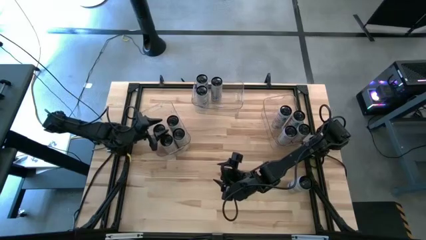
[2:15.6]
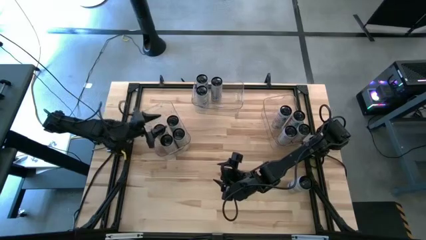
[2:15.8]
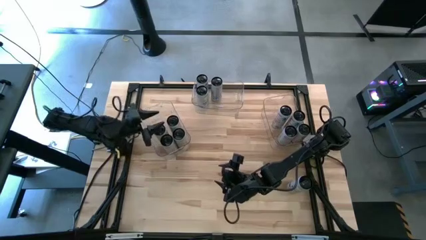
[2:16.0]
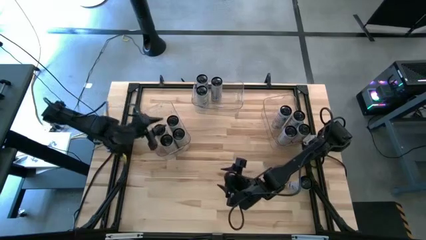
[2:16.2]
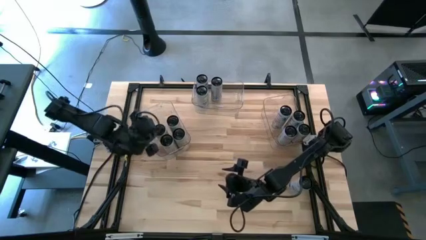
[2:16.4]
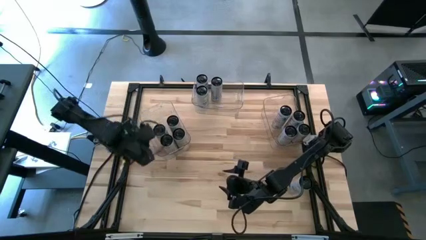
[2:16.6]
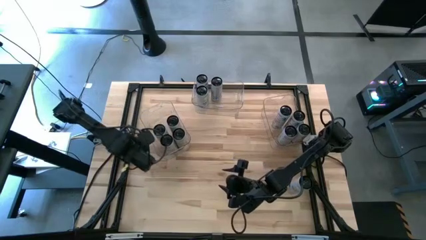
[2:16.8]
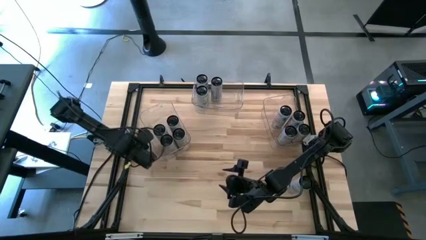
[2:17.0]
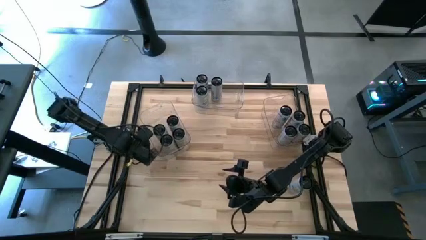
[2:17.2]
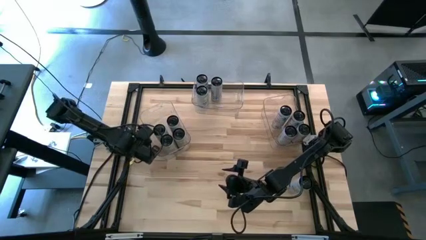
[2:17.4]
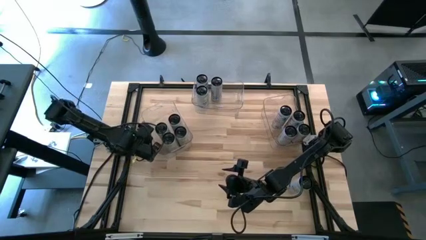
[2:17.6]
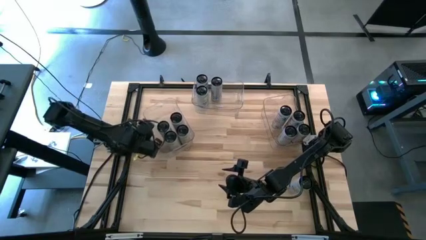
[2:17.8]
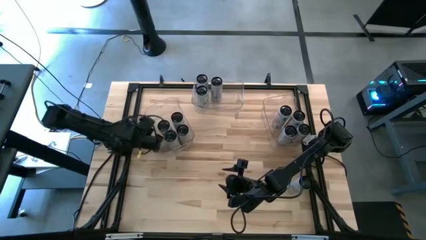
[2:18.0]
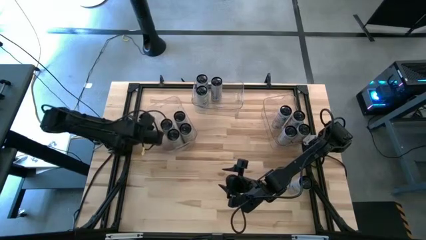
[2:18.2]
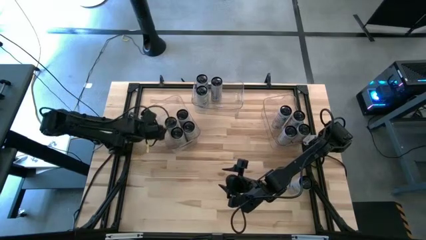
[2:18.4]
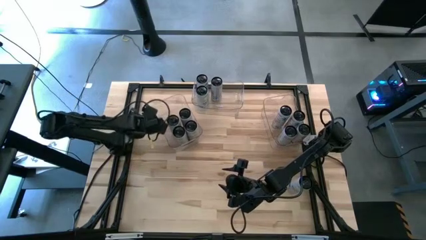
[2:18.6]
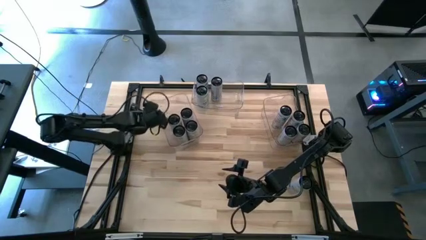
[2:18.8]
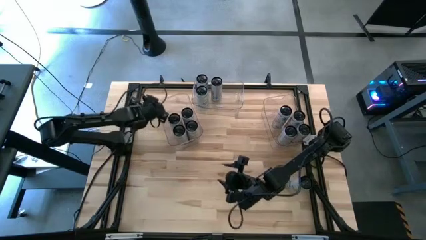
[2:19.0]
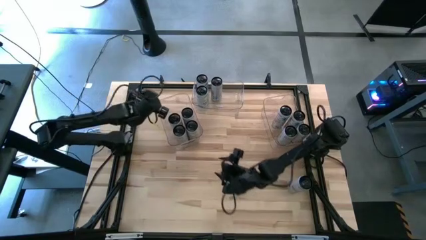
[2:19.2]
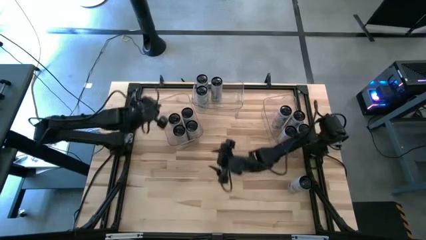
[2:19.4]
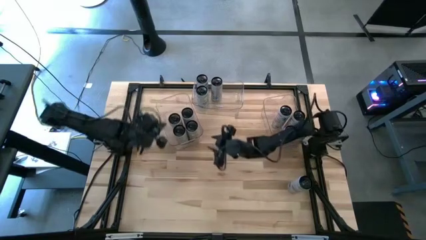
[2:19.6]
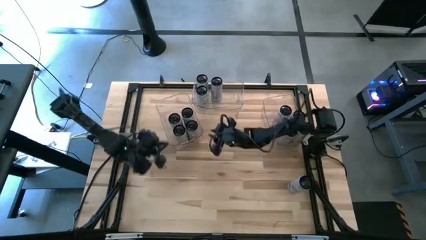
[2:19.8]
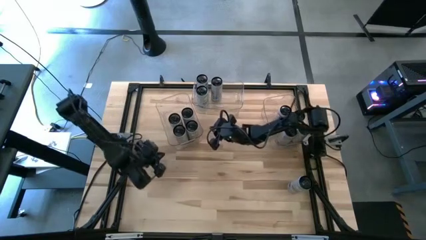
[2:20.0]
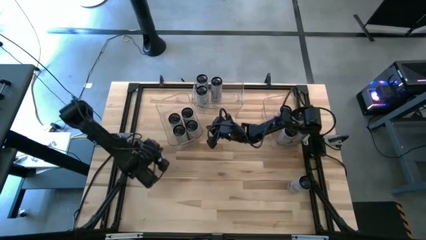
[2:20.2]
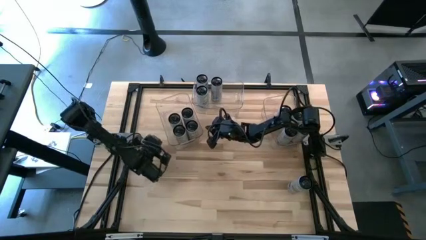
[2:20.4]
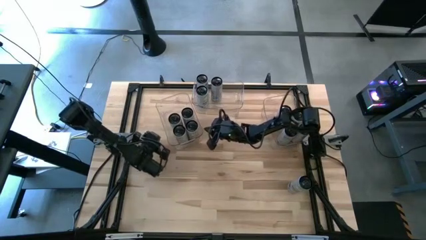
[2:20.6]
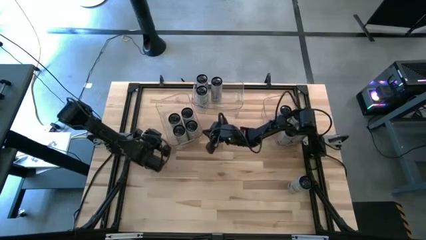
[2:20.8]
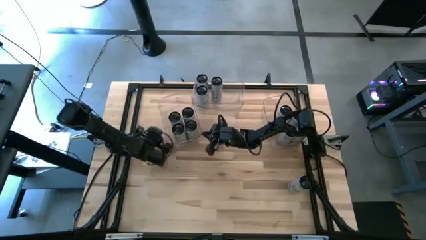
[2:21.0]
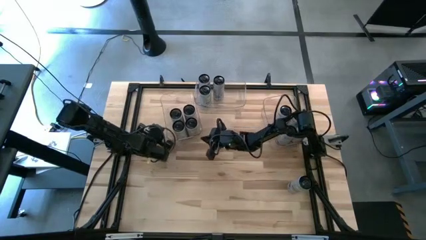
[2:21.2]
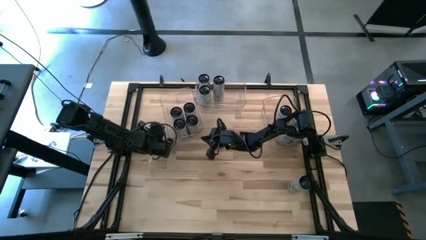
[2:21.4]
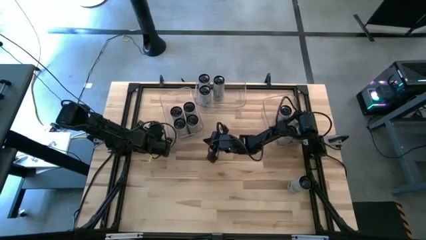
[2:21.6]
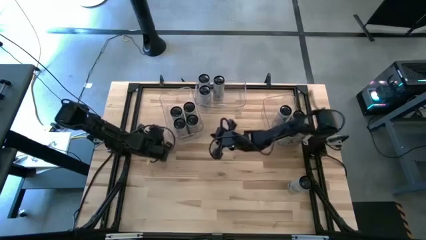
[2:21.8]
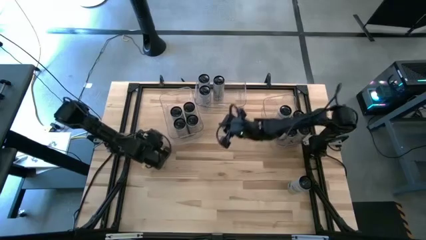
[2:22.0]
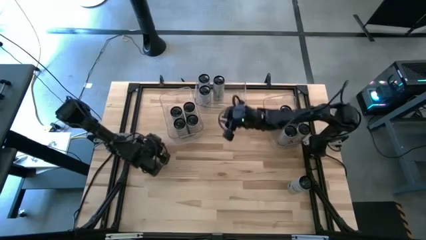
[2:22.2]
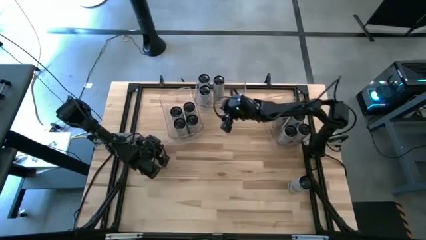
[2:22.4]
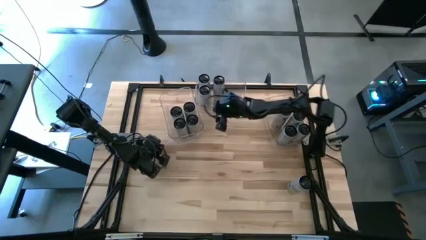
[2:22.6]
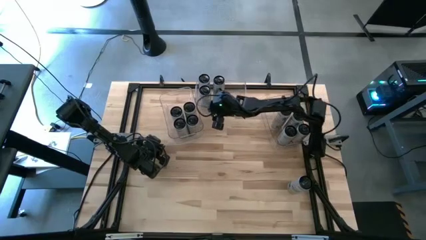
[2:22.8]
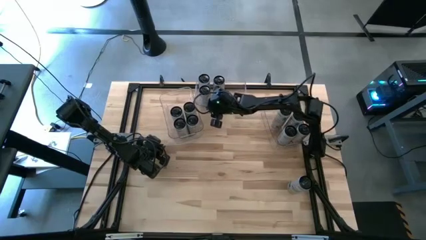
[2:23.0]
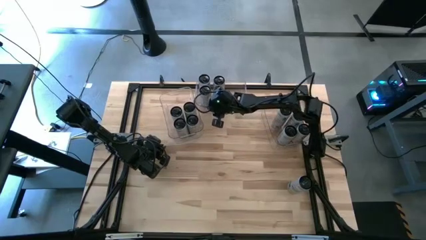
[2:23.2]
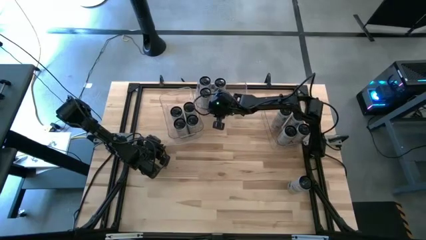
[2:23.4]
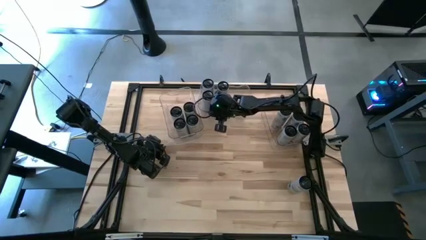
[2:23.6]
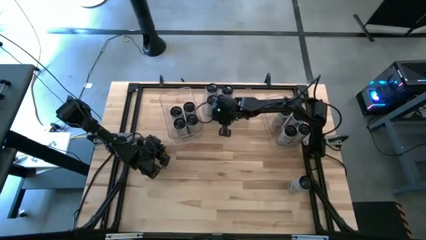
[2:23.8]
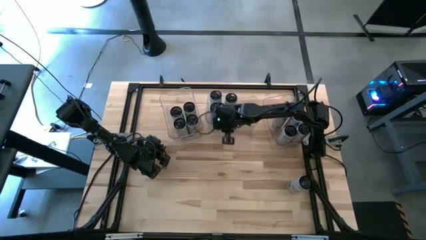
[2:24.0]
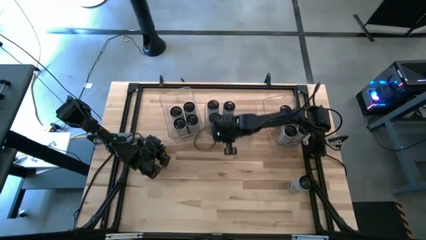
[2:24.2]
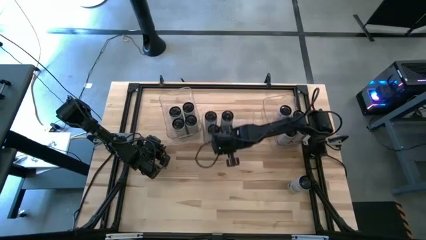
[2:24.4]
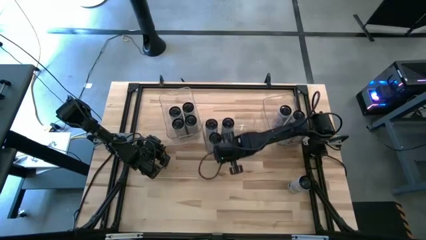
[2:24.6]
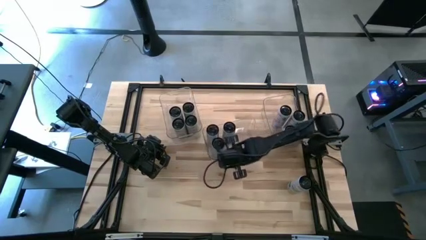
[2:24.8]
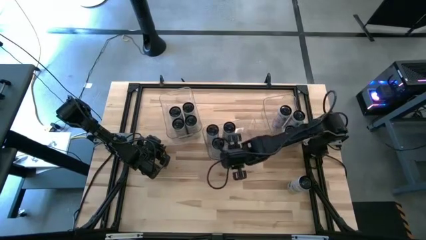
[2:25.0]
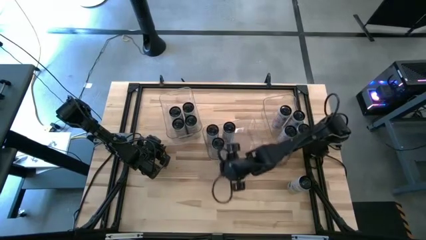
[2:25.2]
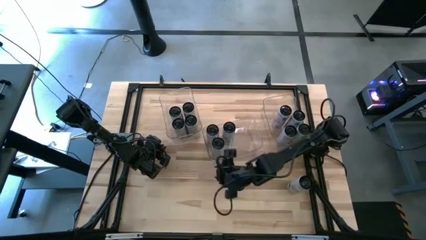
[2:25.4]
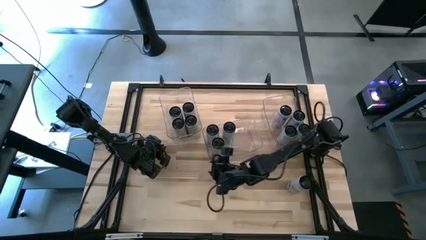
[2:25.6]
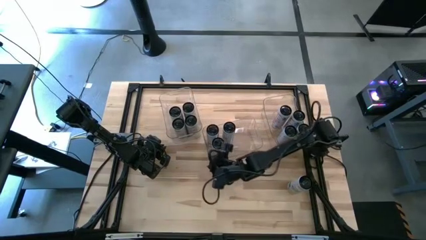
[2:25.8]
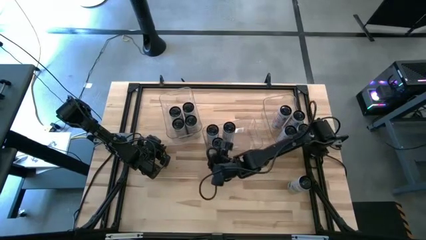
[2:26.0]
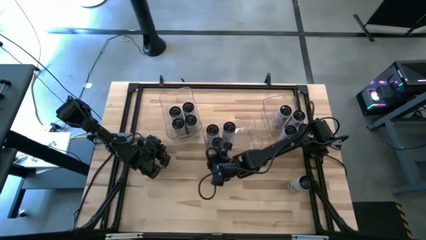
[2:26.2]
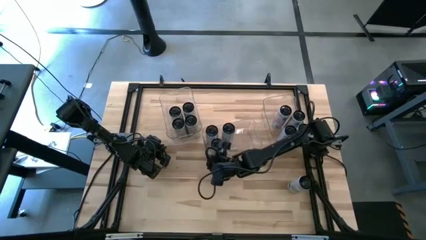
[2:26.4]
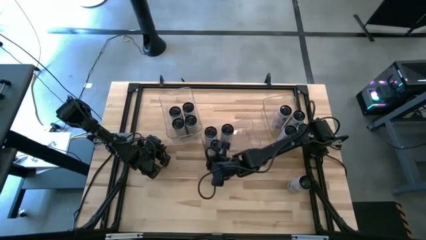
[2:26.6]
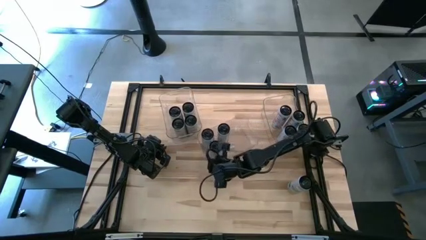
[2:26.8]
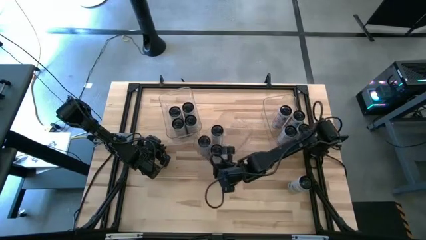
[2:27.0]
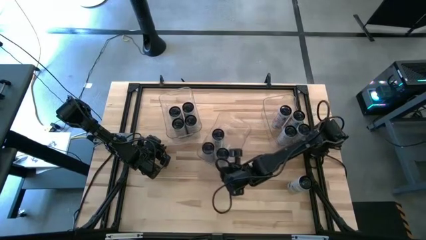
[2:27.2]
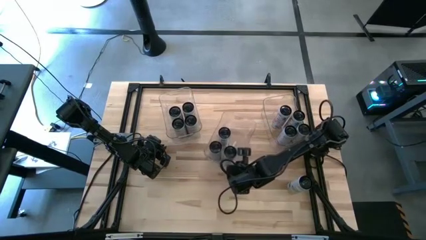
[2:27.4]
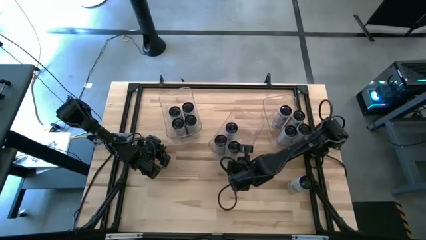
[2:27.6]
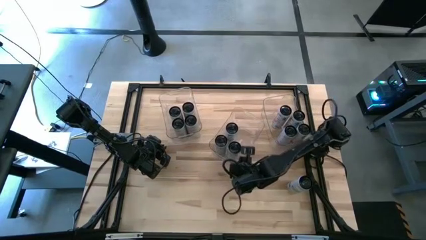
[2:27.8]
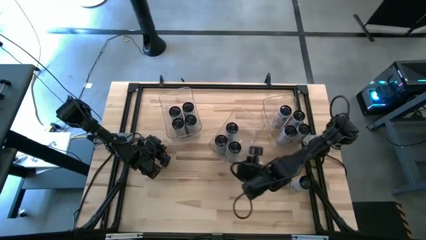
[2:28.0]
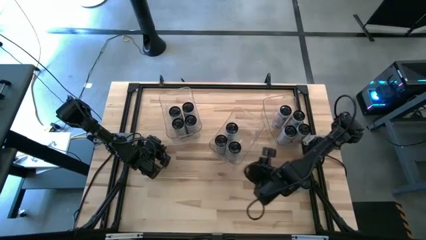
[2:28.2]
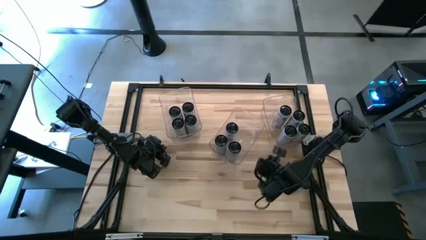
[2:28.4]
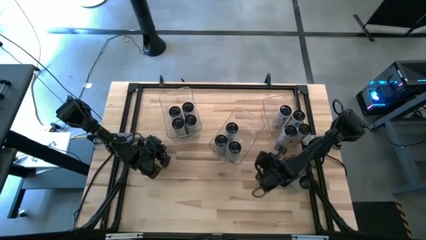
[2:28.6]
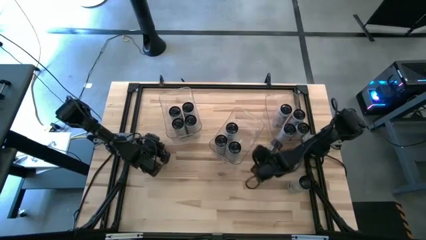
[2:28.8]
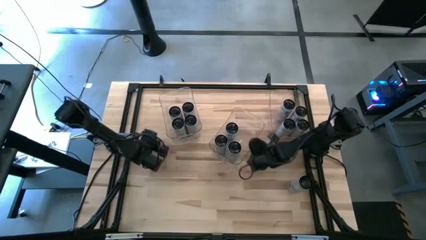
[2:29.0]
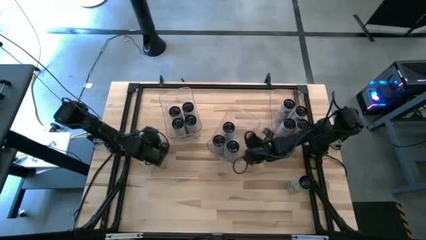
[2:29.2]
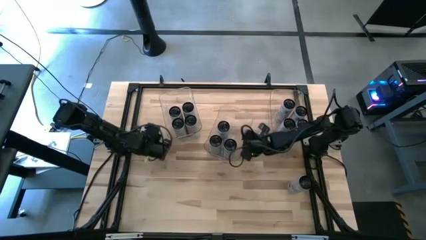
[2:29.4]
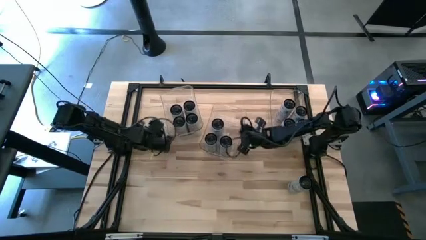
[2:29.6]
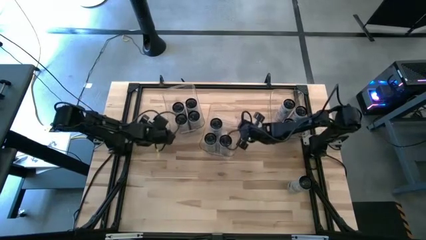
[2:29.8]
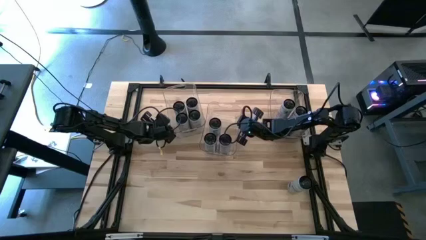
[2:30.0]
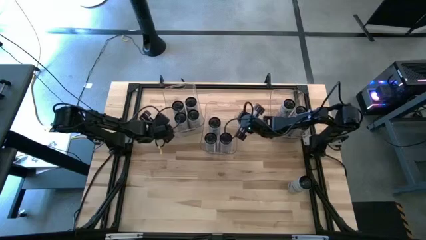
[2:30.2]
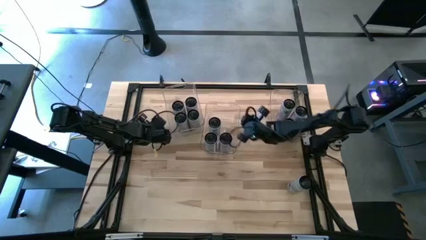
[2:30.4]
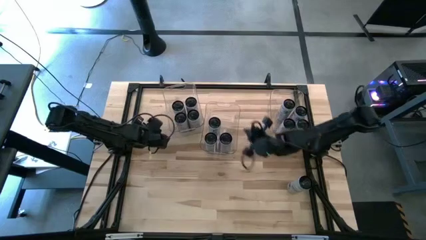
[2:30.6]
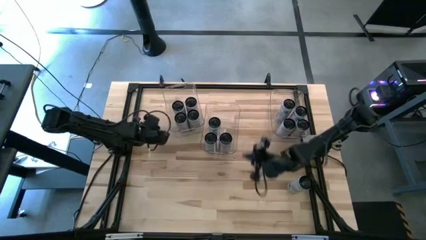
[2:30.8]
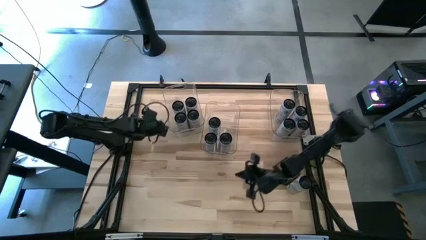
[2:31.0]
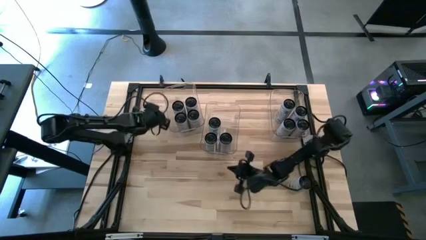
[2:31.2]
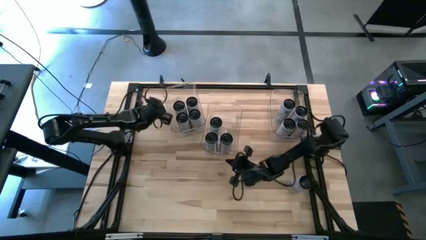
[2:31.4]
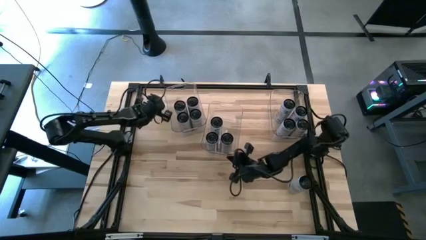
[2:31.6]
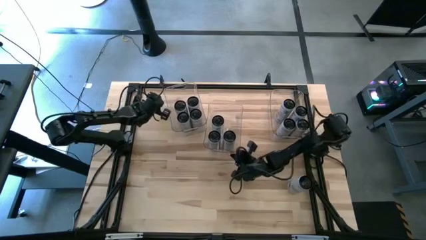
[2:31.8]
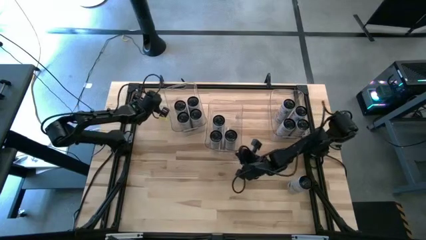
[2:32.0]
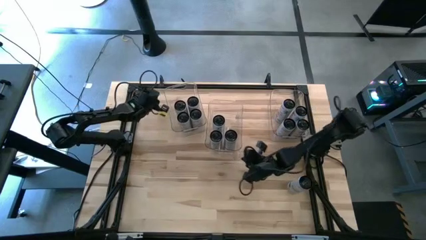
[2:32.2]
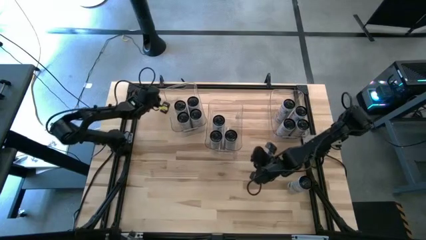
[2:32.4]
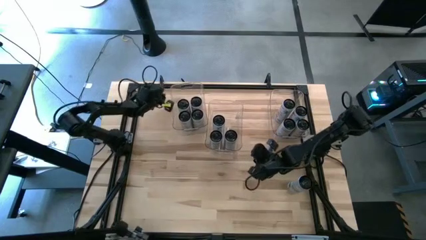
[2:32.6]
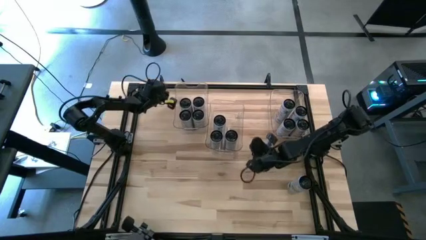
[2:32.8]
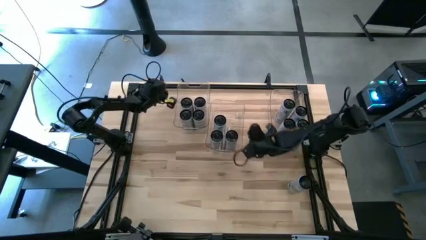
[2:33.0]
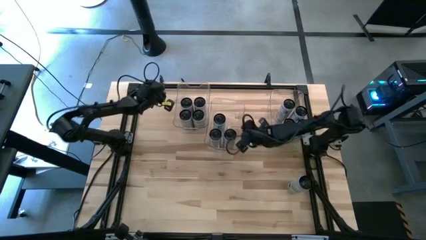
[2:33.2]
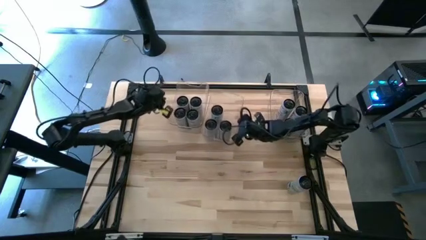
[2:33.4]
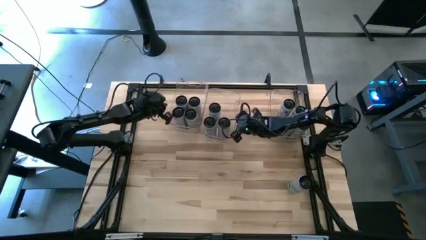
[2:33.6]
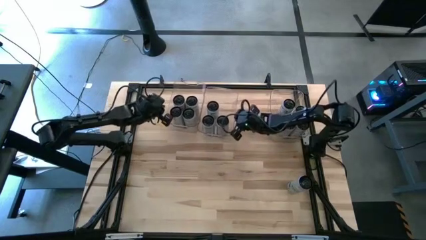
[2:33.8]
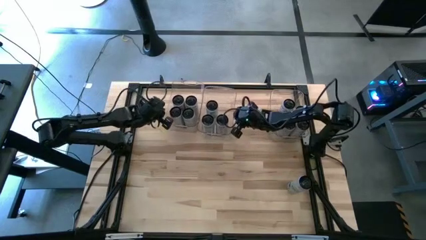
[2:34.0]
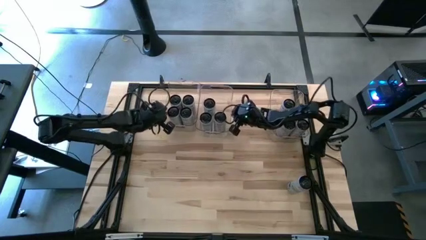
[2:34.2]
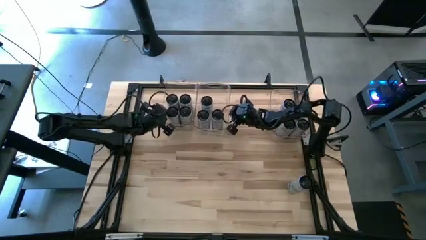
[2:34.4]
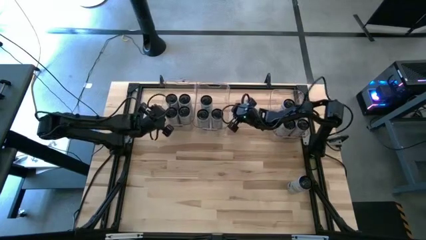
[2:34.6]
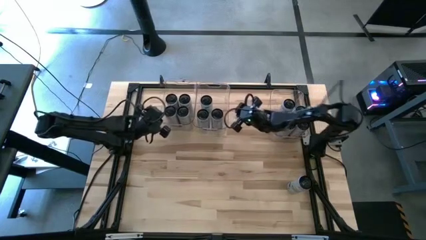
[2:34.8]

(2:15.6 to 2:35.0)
Task: Sort soda cans
Adjust the transparent bins
